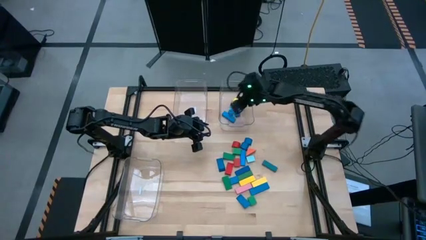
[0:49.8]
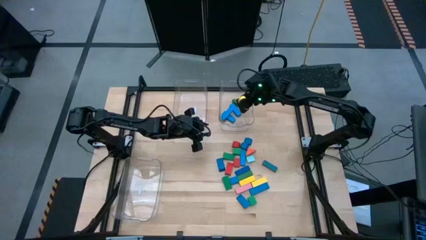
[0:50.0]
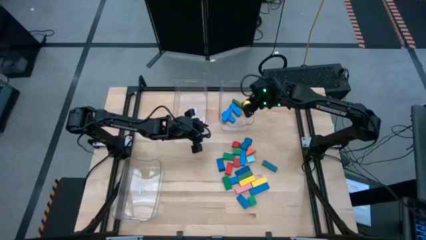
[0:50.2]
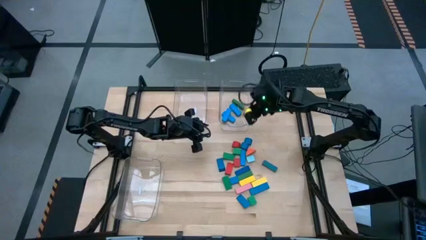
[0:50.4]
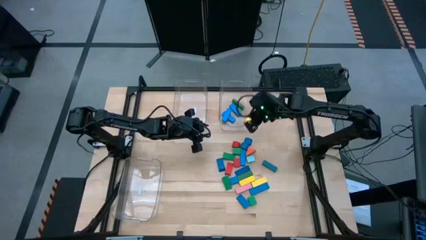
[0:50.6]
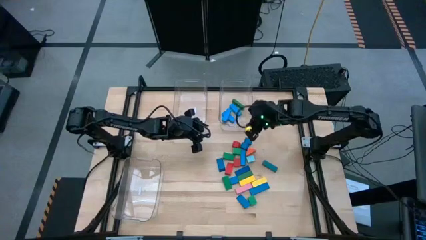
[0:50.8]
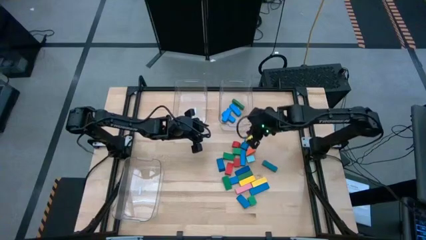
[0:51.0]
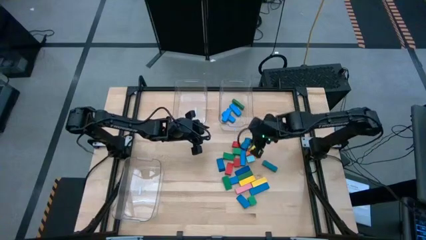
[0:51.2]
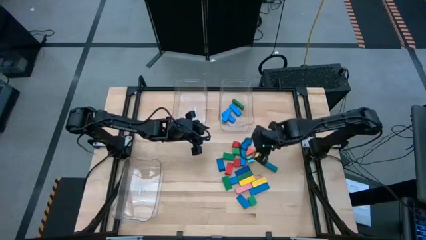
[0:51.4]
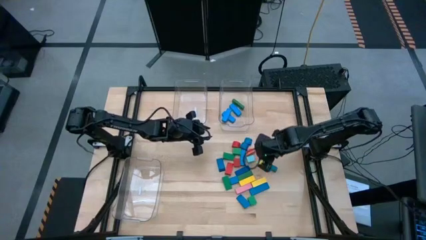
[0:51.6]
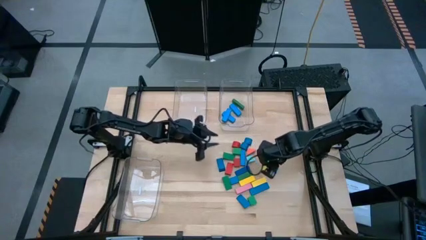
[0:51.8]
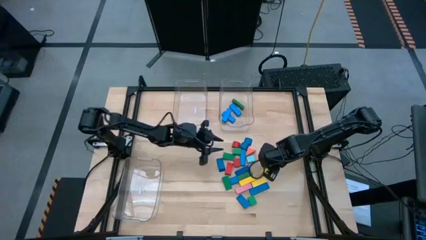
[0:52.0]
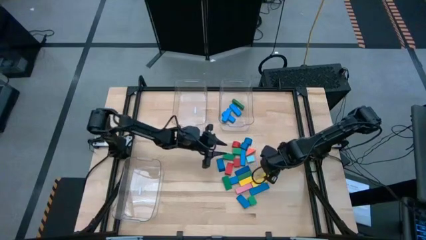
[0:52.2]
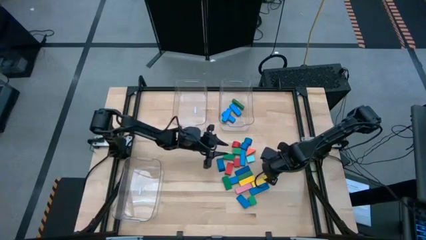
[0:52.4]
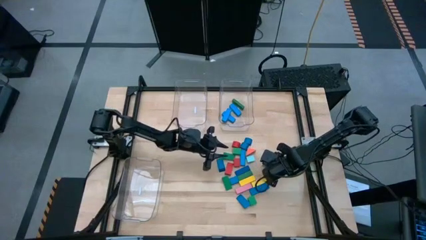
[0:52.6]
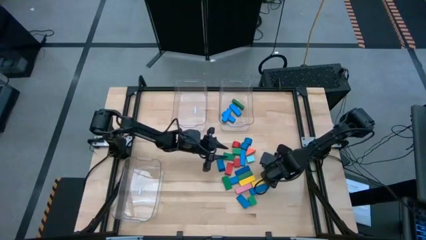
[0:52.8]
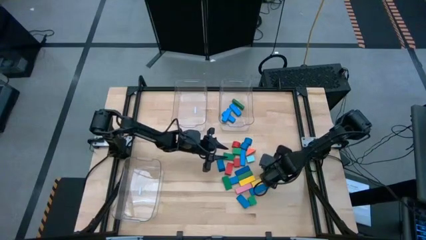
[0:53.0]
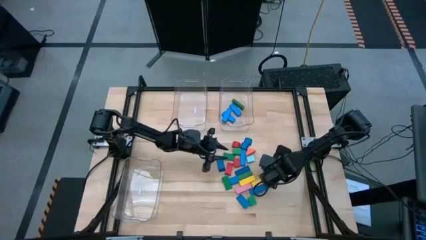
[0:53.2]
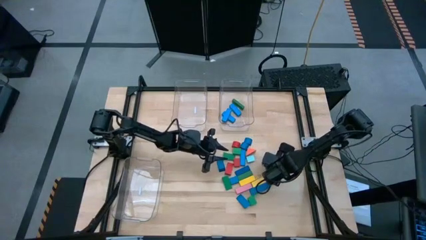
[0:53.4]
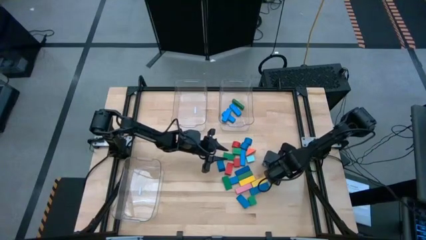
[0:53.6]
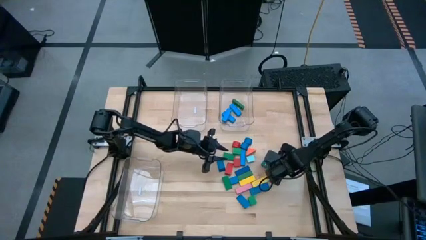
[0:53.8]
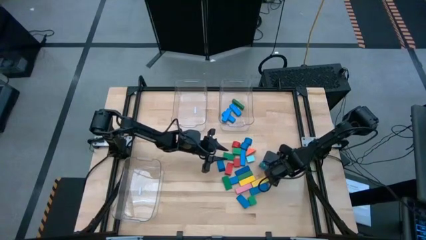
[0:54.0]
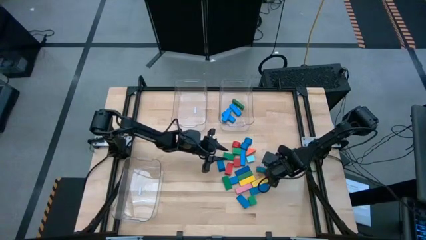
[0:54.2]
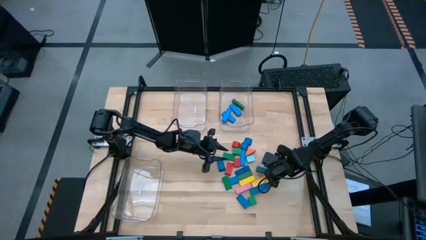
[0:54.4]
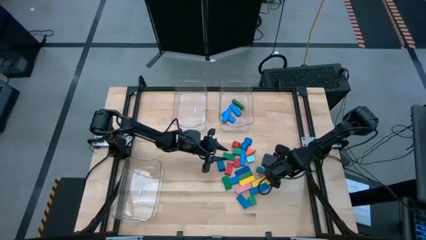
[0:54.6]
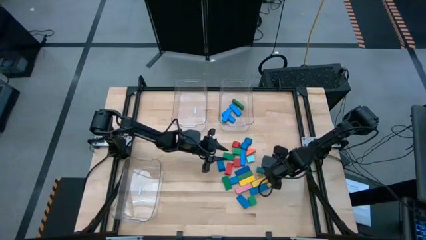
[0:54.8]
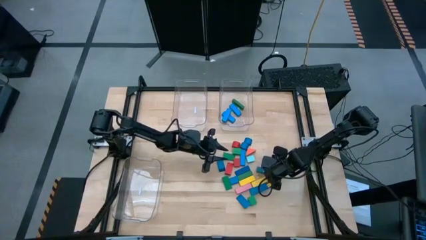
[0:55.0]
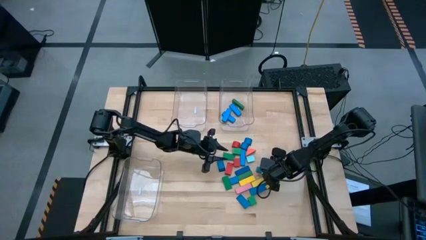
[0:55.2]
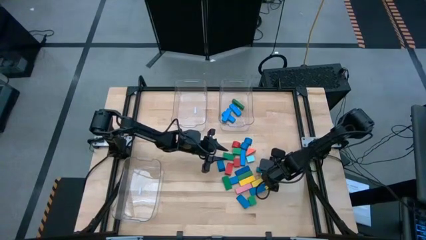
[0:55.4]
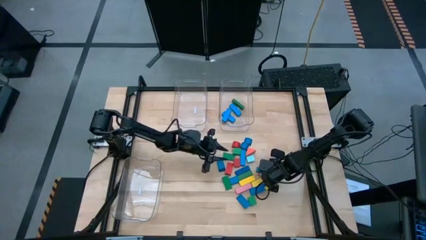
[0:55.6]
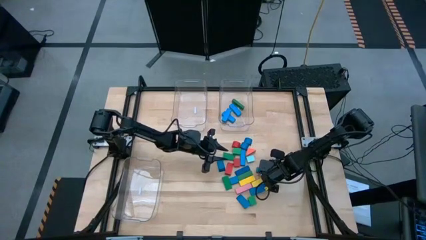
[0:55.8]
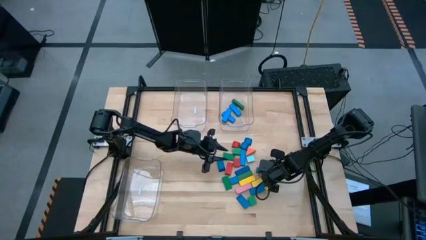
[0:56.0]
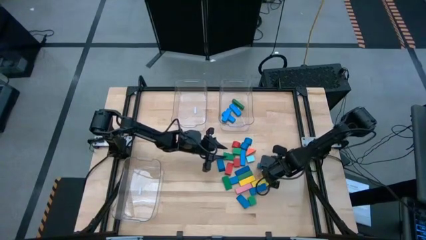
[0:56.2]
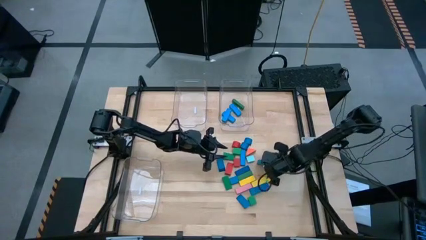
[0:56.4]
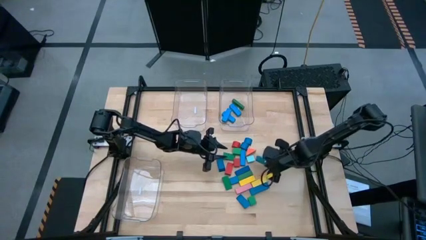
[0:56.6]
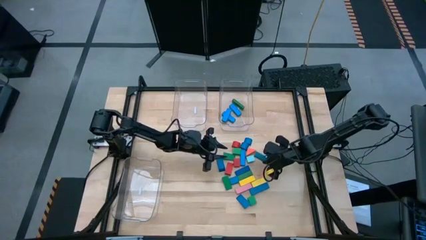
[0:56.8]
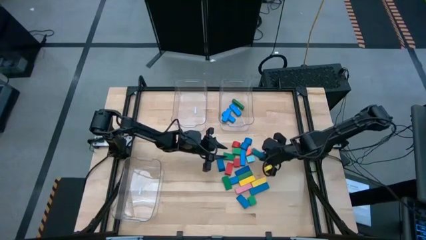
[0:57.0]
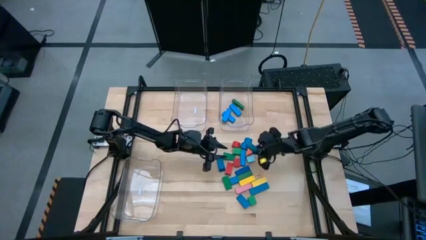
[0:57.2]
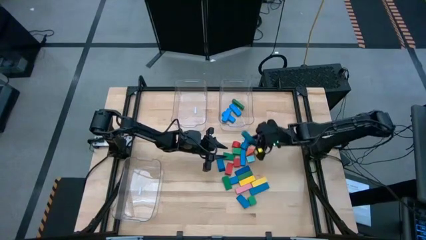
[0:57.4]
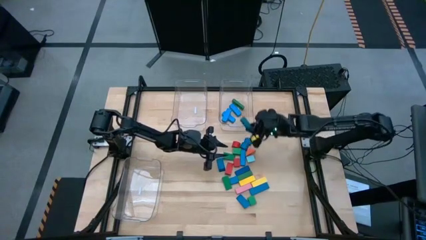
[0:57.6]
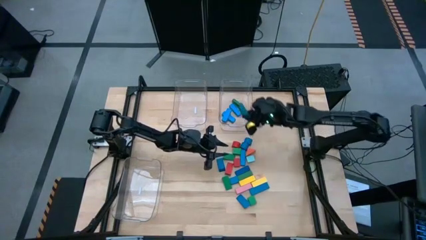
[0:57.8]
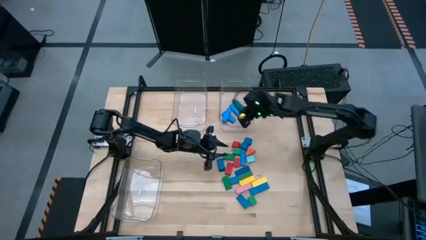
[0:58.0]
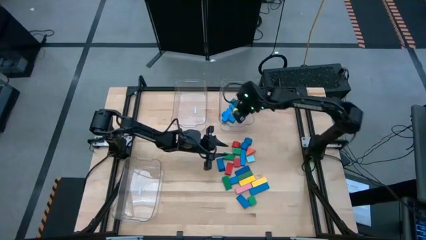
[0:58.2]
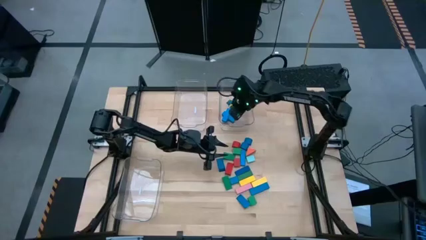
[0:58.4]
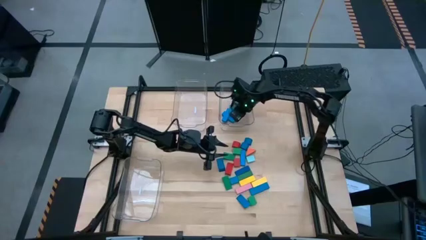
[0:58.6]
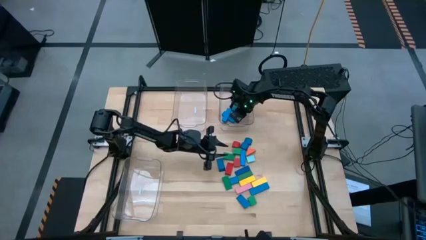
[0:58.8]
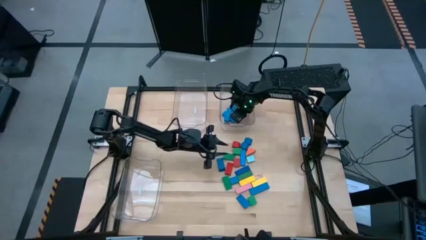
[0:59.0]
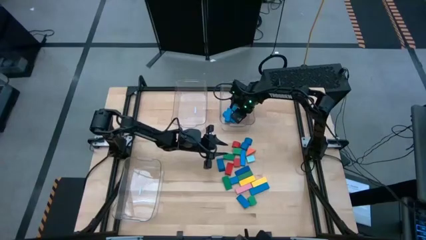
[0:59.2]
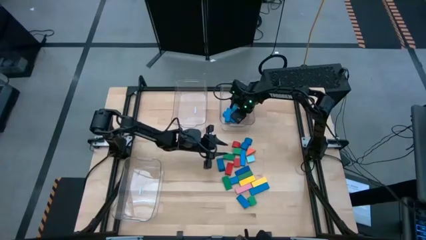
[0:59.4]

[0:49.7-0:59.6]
Task: Sort blocks by size
Put the dark blue rectangular block into the top right transparent bin

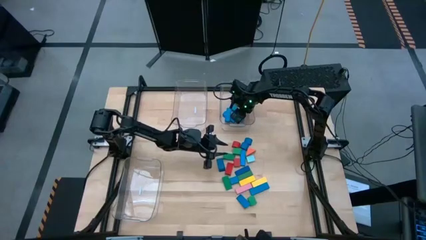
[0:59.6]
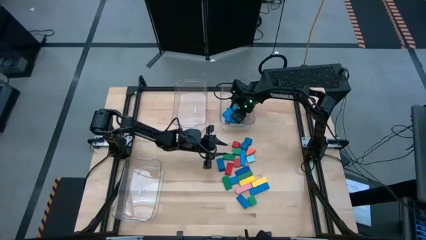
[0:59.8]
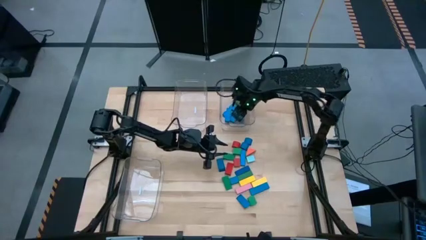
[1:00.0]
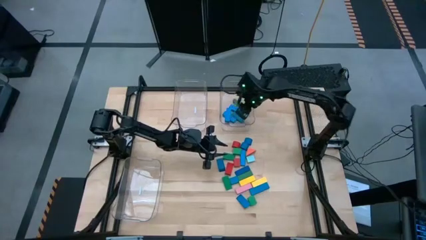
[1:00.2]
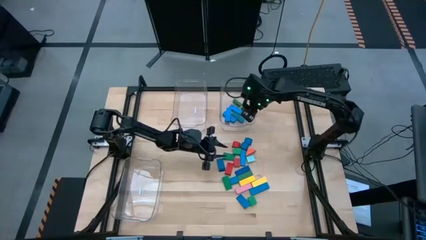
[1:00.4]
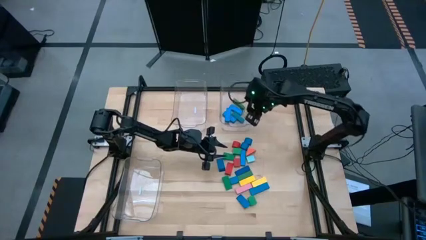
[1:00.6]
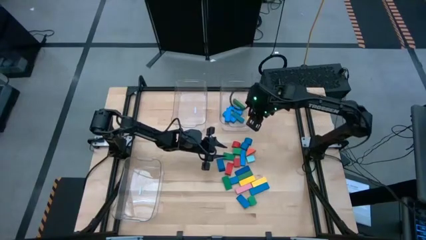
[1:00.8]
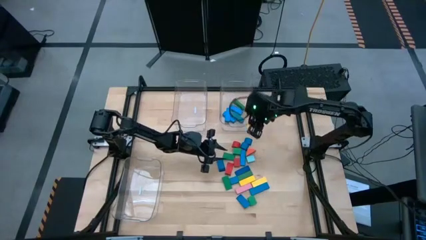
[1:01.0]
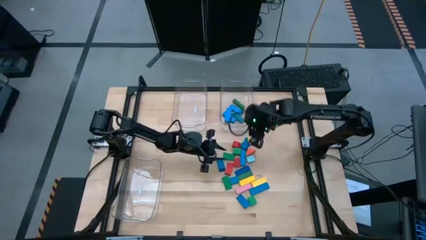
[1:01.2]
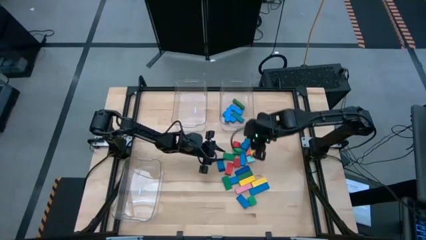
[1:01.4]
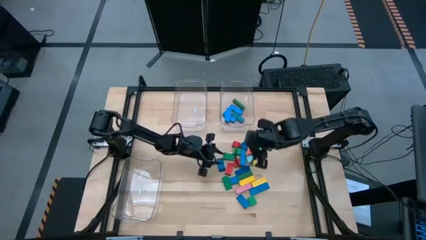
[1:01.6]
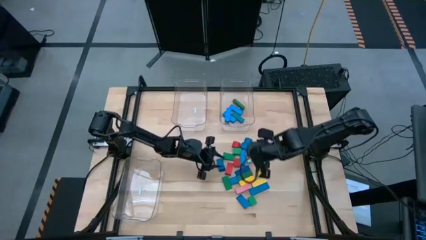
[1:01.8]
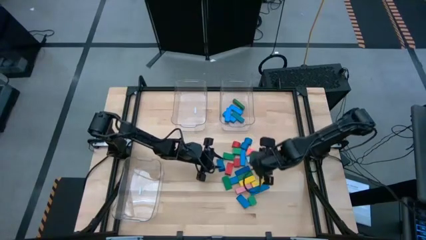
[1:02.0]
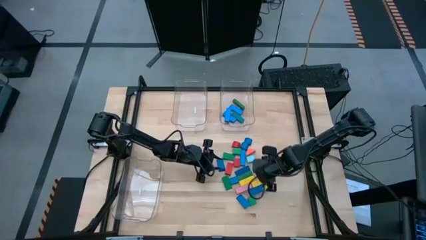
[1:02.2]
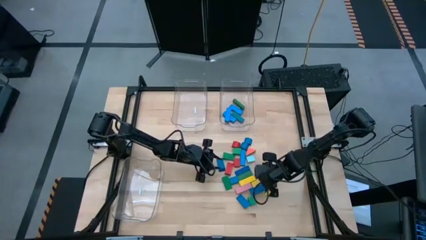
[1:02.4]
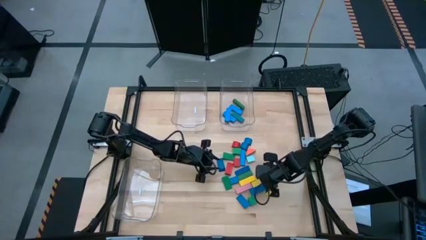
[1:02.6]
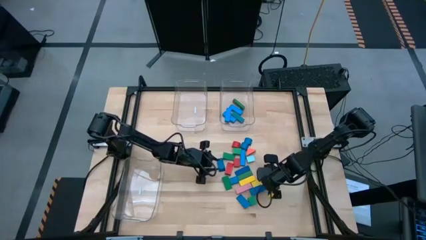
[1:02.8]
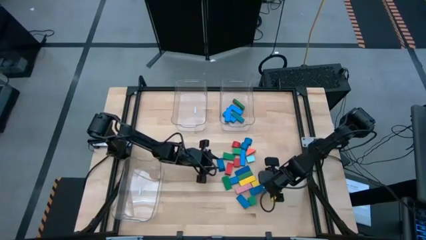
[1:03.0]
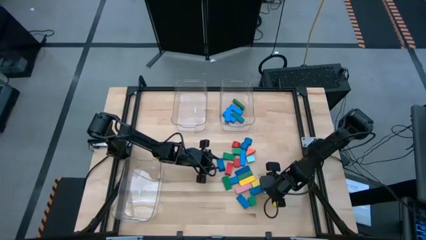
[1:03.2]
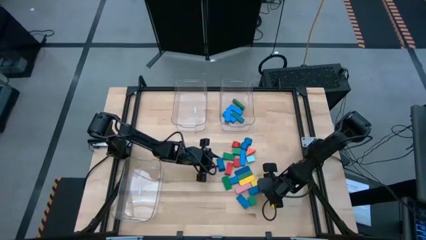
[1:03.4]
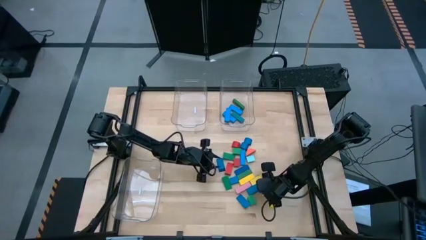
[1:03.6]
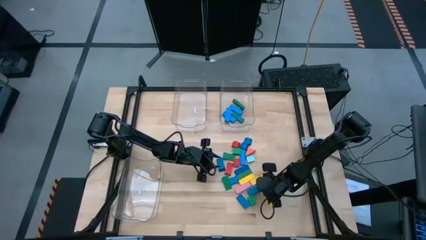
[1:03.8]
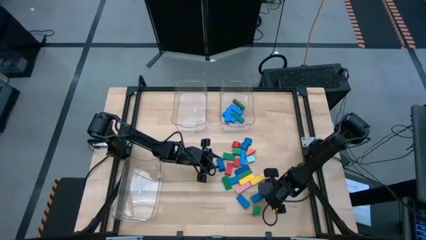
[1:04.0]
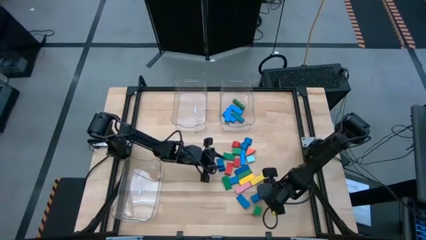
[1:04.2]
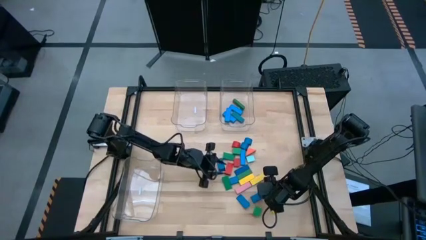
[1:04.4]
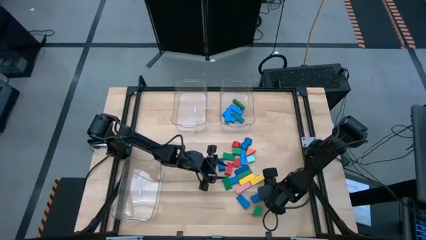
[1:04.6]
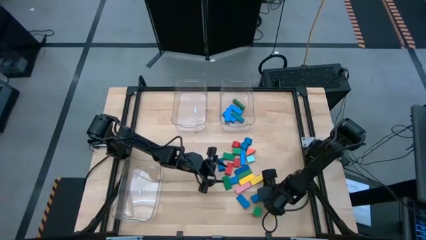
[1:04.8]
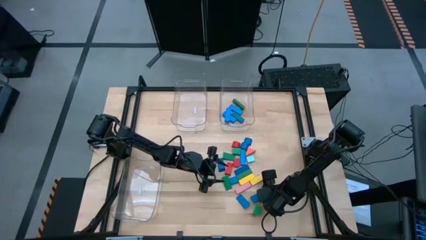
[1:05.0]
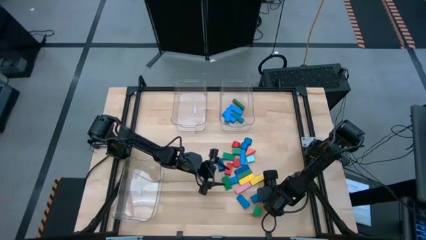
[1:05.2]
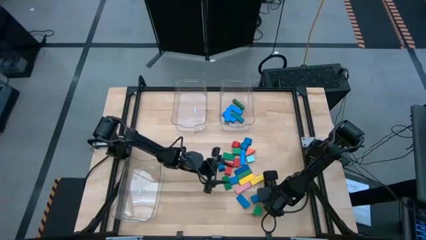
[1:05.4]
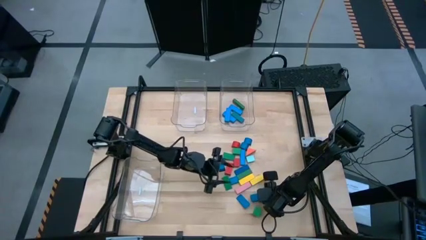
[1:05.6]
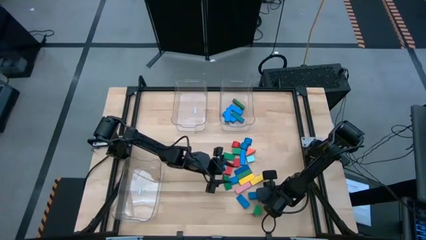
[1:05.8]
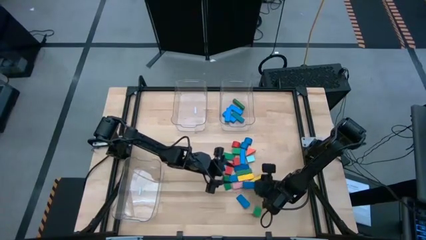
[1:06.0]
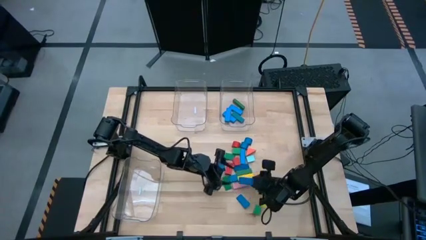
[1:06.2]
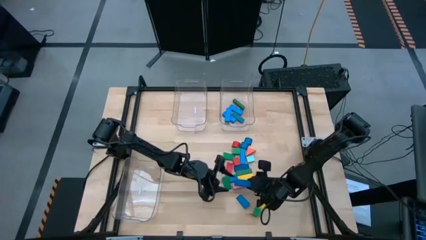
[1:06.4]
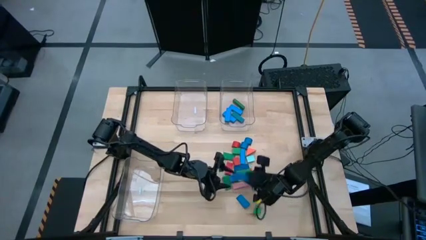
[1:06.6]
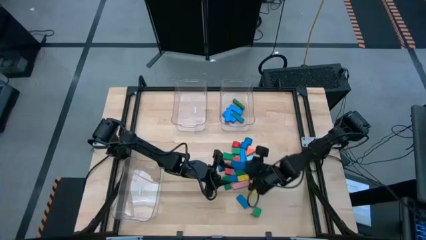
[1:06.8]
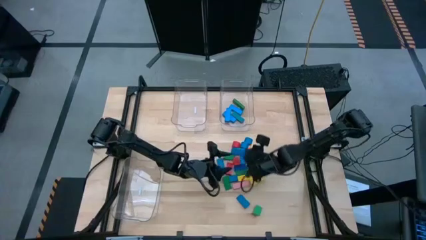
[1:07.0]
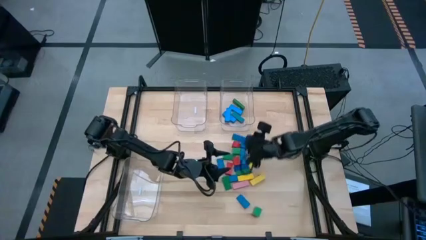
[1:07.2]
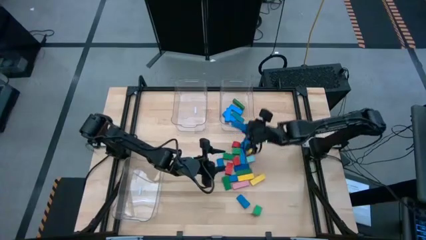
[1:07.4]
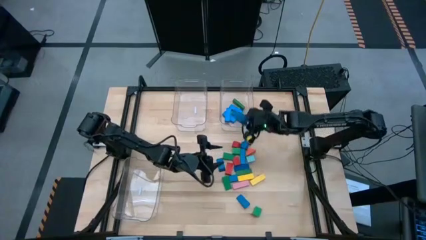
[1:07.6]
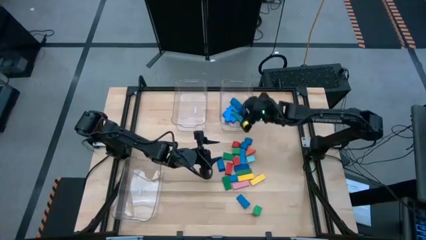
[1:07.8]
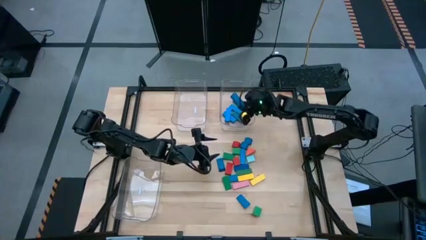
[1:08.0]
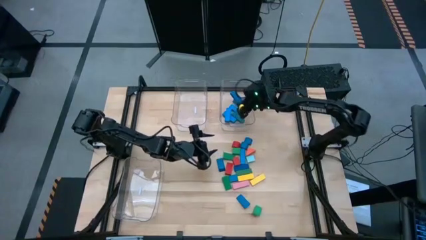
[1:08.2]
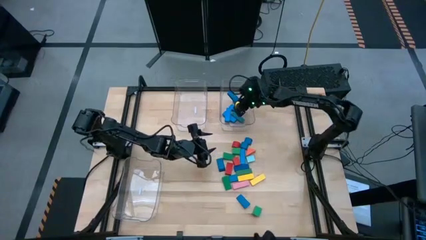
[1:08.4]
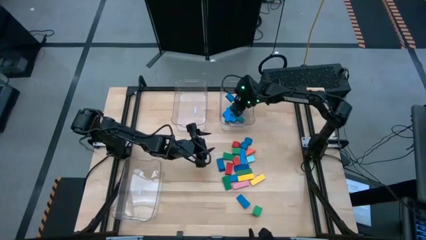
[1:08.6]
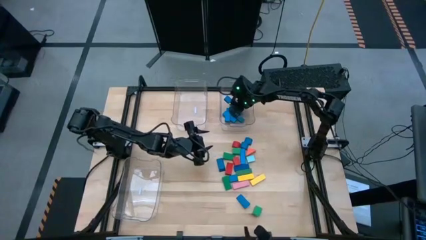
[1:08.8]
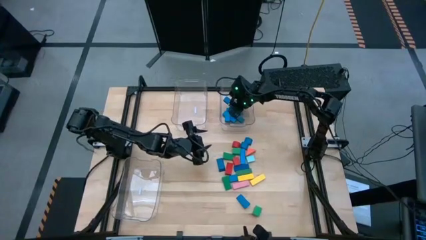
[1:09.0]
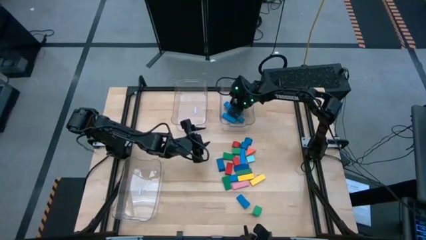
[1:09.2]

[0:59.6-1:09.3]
Put the blue rectangular block into the top right transparent bin
